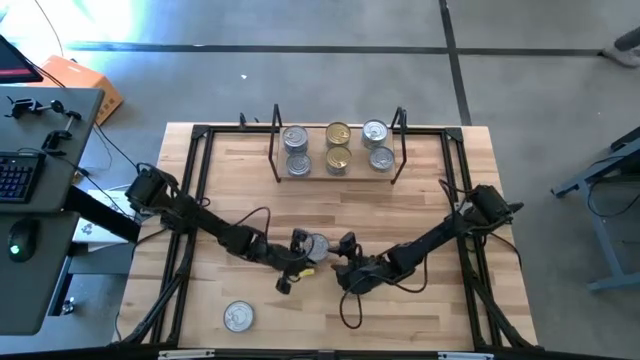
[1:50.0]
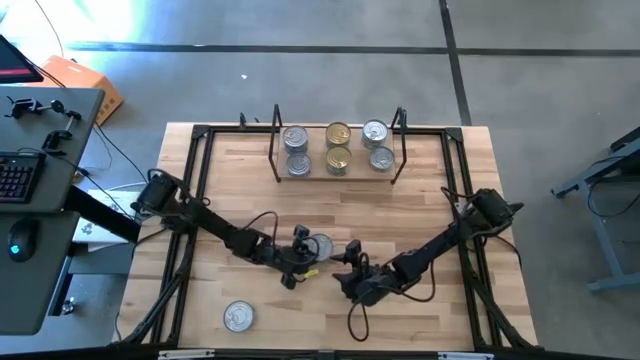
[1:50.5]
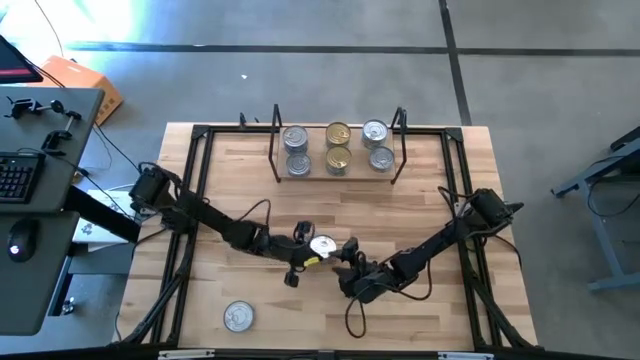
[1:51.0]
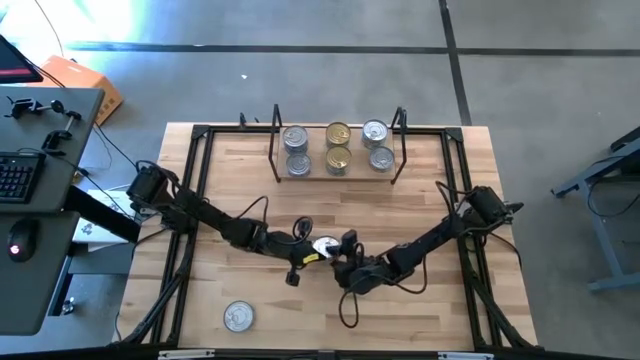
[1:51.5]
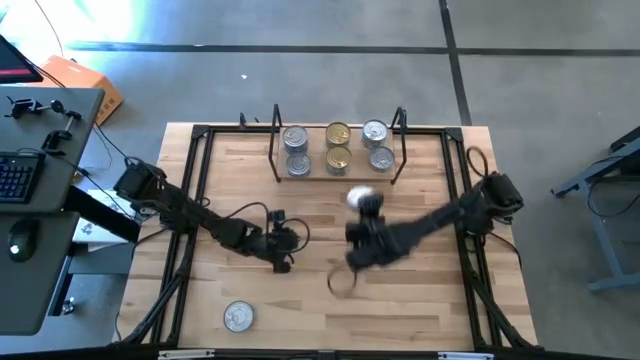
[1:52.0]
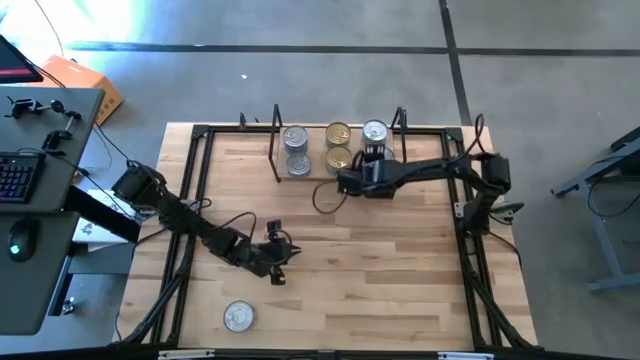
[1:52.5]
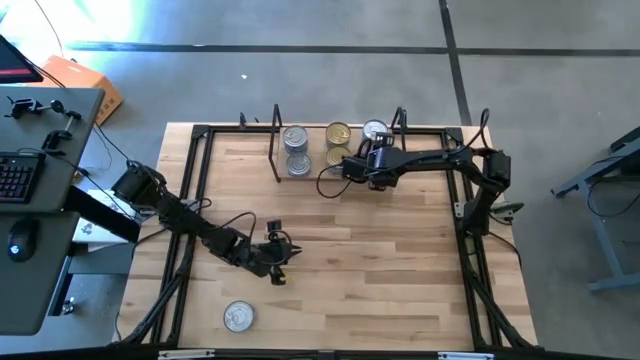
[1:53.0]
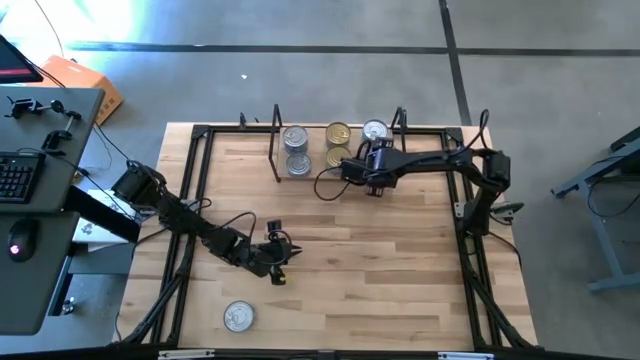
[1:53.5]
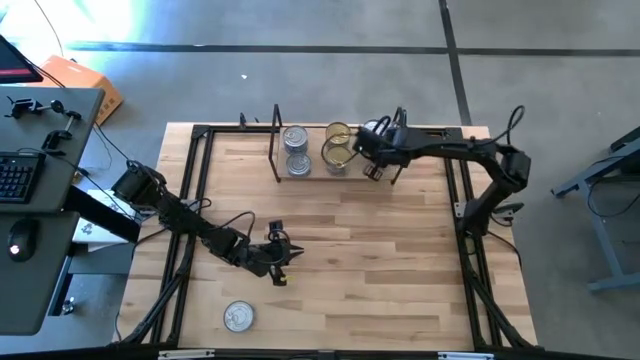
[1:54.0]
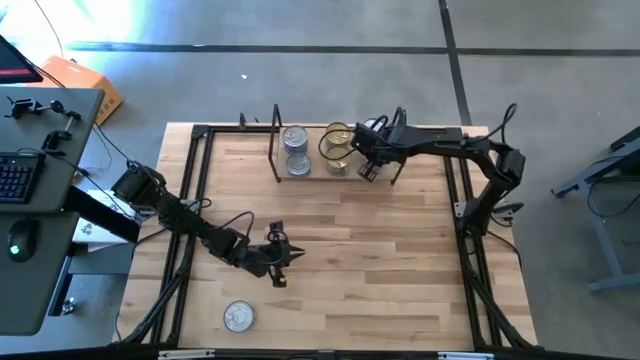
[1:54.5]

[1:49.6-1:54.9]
Task: Stack canned seafood by type on shelf
Stack the yellow and blue tuna can on top of the yellow and blue tuna can on the shelf

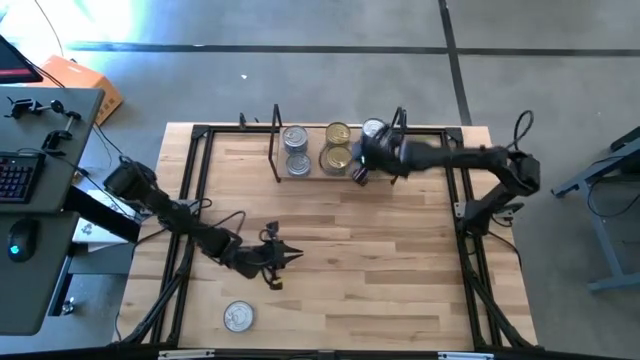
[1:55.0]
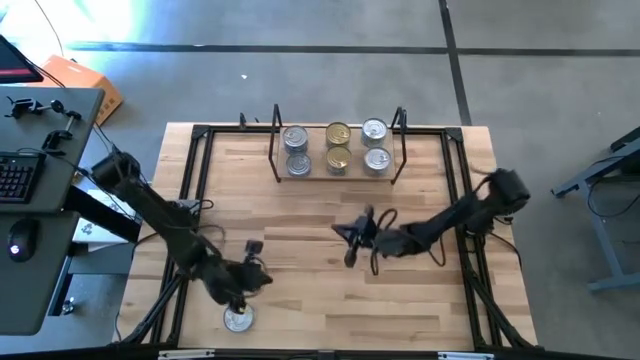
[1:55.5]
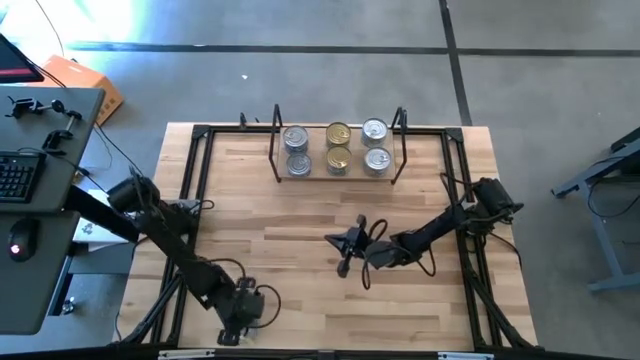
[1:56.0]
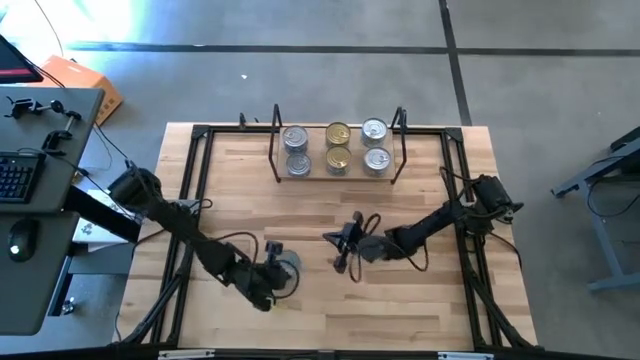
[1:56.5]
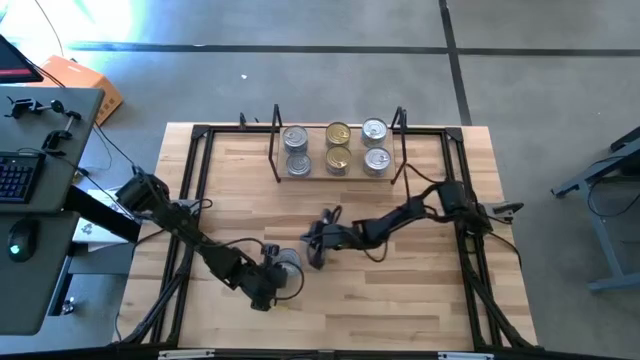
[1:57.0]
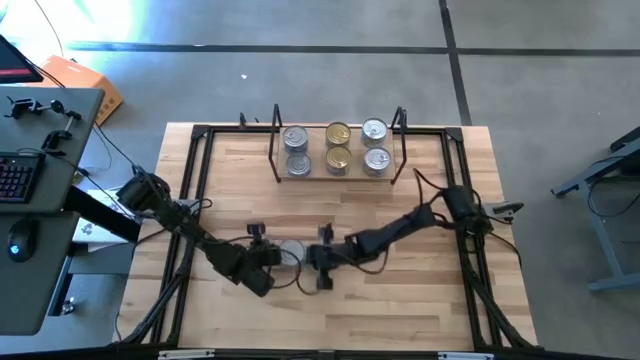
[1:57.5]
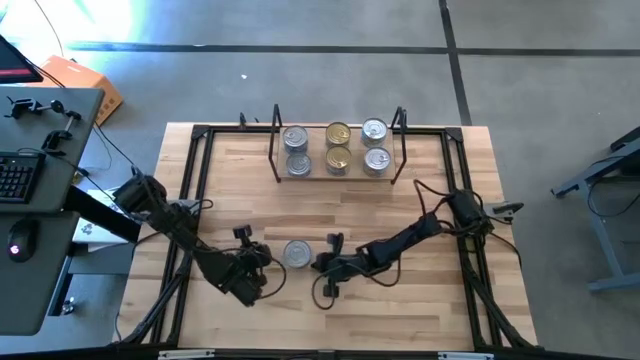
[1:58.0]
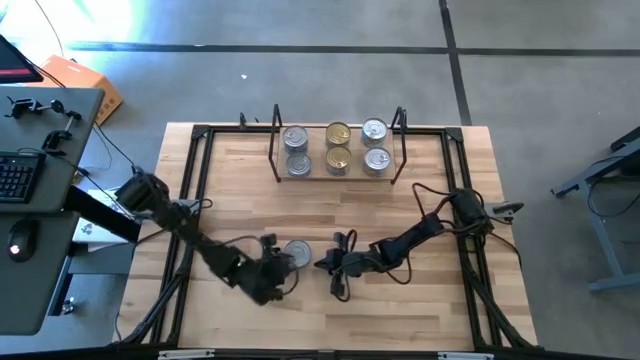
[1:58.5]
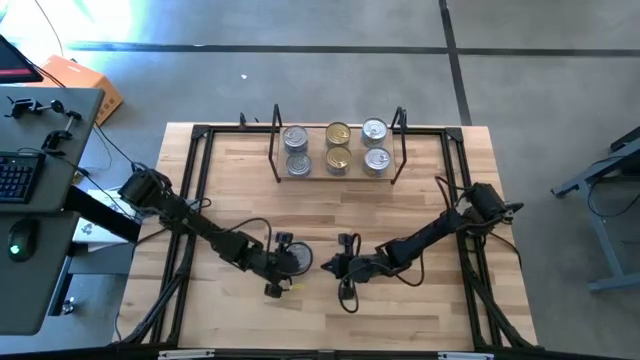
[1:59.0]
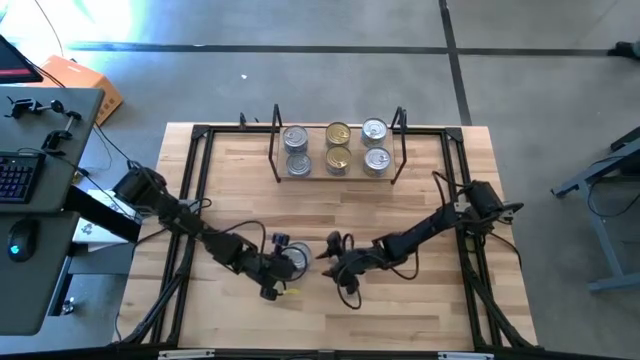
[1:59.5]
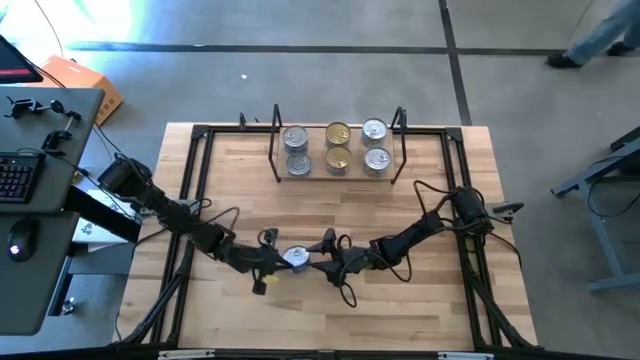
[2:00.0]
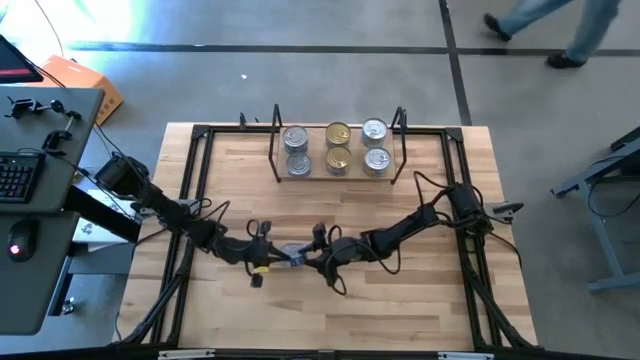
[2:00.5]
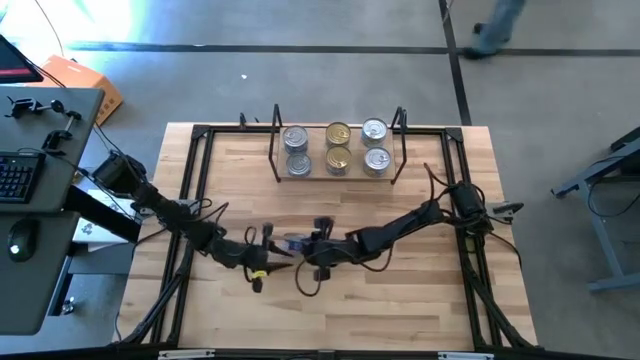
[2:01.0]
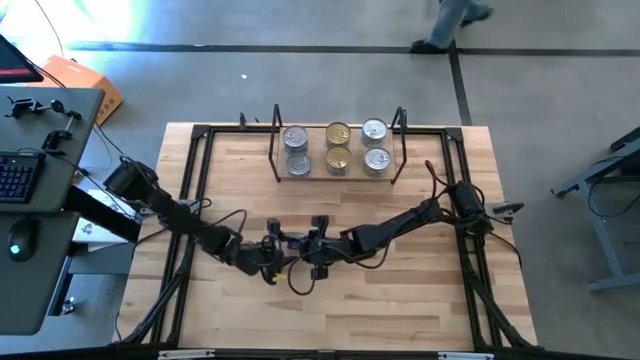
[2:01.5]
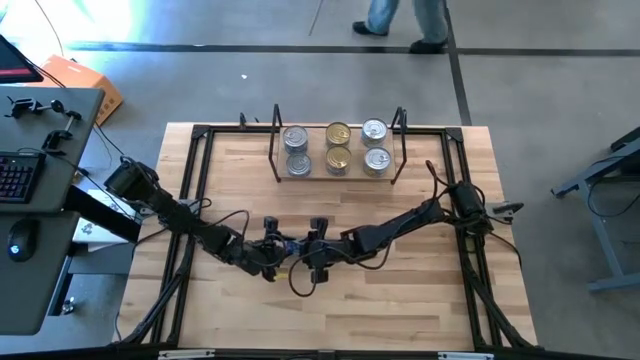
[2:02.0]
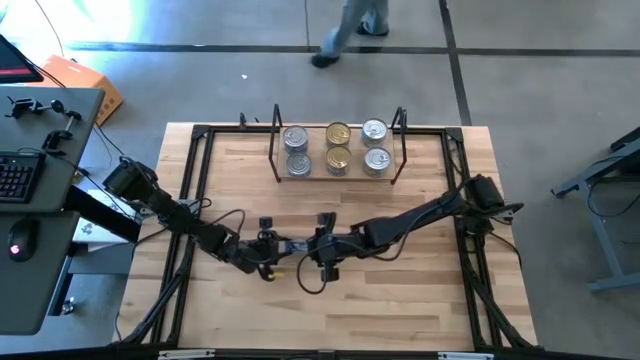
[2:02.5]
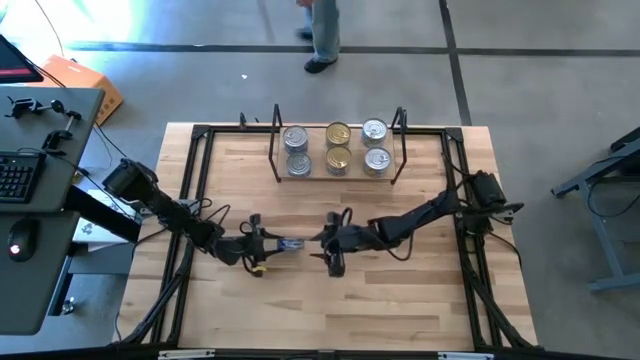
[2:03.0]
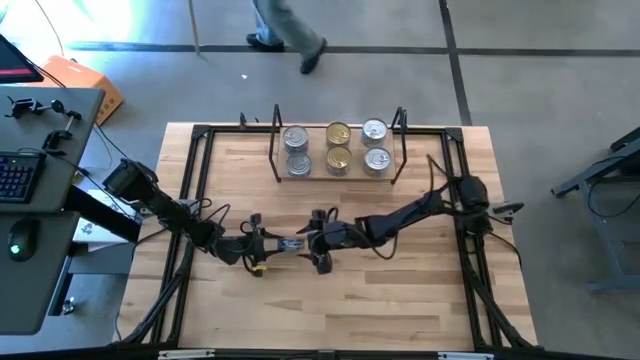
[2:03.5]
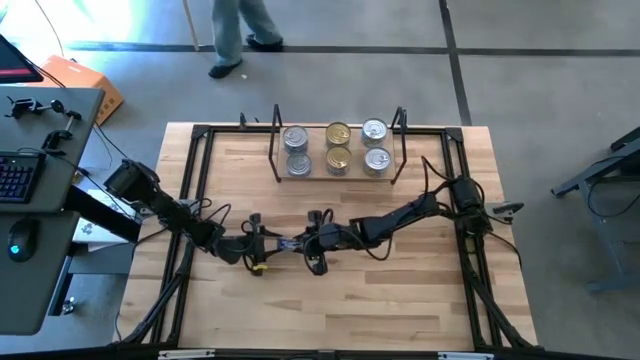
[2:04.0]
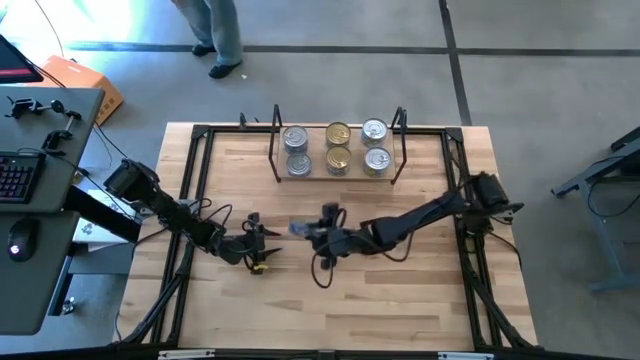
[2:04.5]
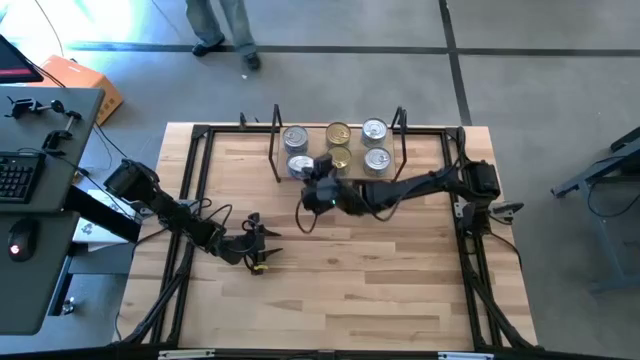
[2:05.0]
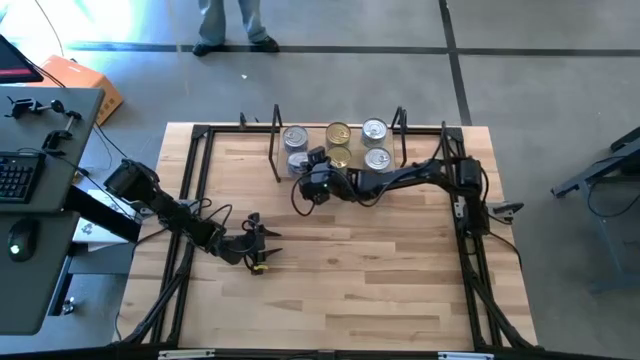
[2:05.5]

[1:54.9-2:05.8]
Stack the blue tuna can on top of the blue tuna can on the shelf

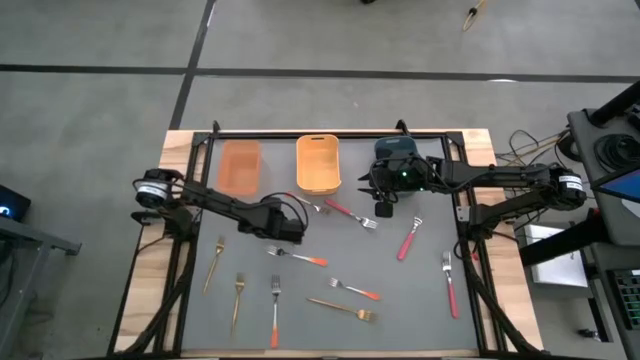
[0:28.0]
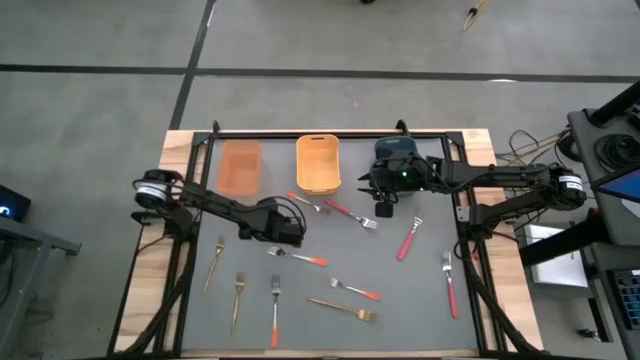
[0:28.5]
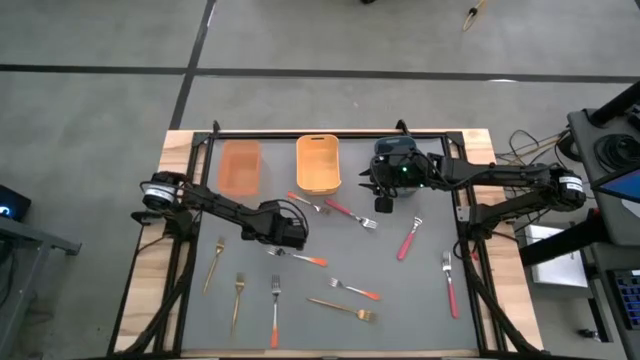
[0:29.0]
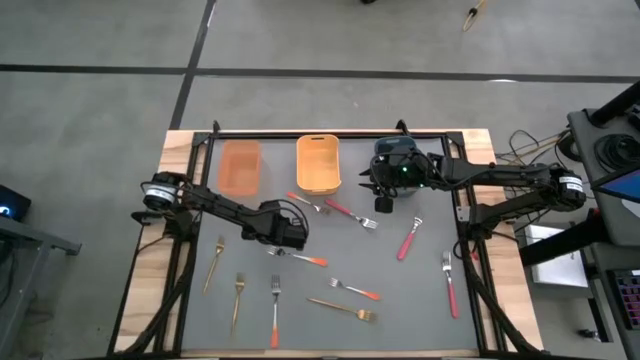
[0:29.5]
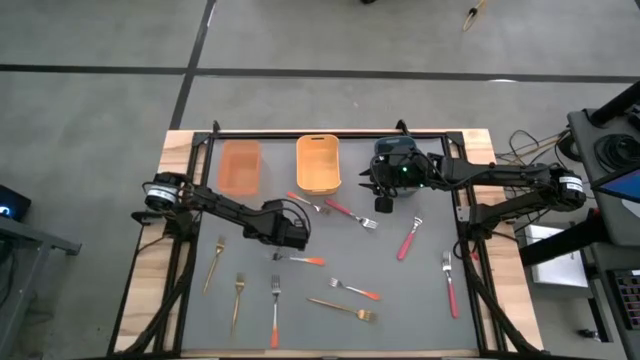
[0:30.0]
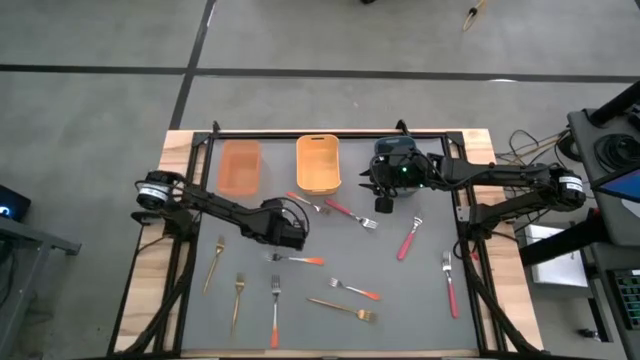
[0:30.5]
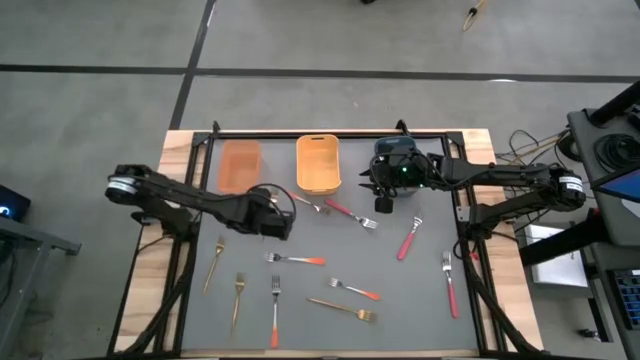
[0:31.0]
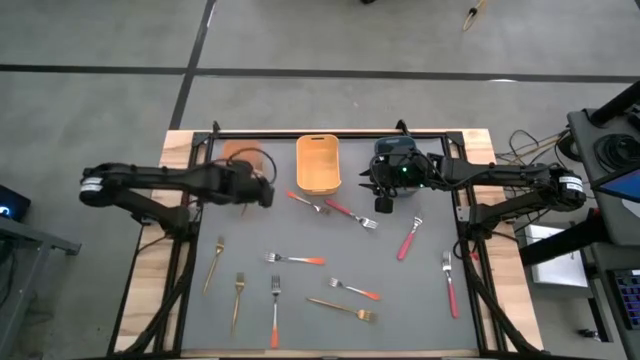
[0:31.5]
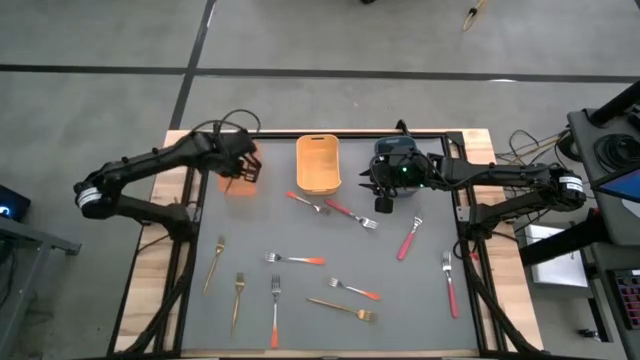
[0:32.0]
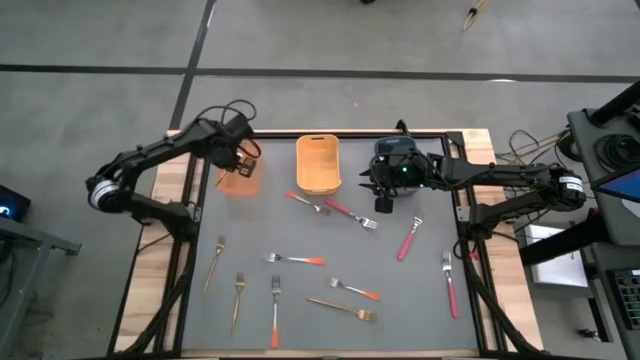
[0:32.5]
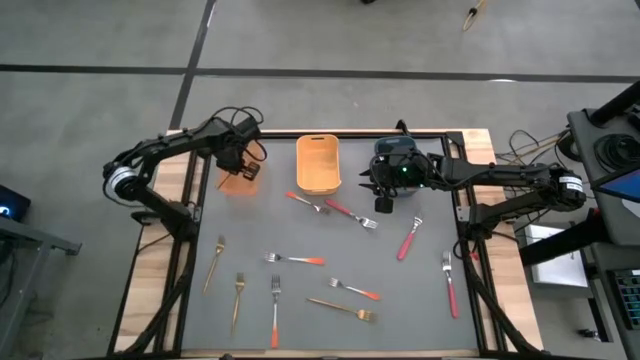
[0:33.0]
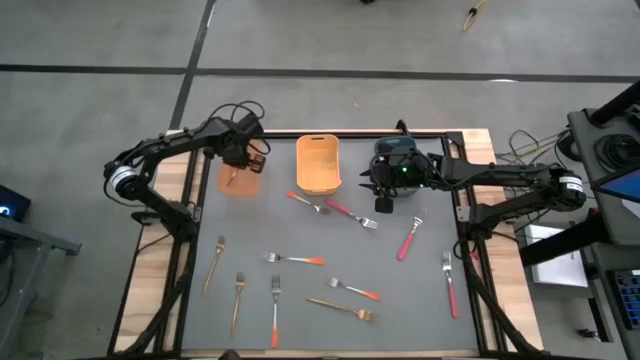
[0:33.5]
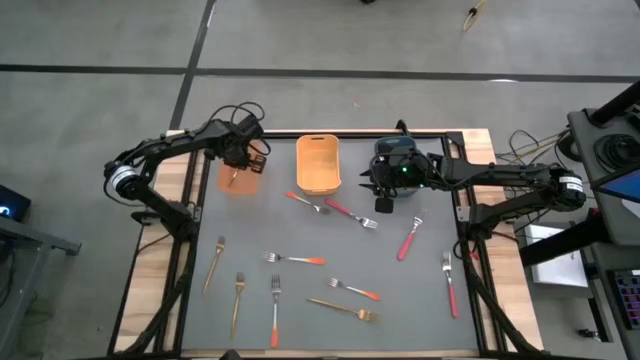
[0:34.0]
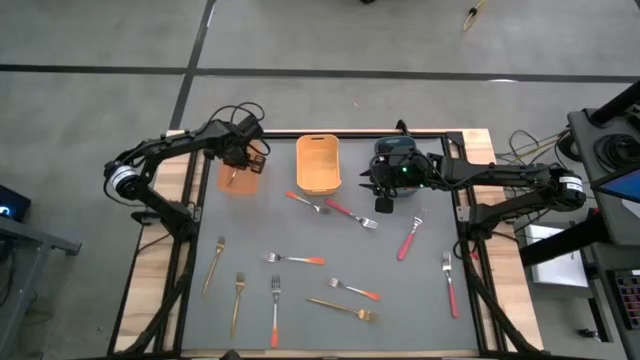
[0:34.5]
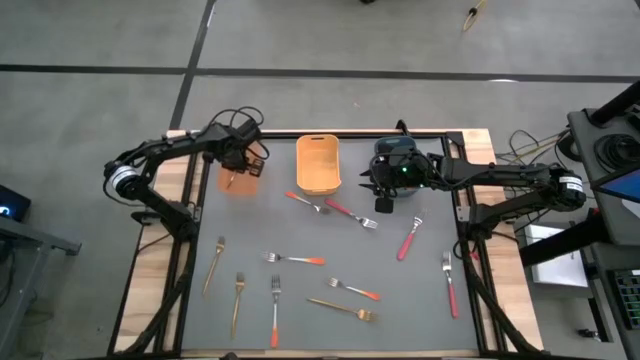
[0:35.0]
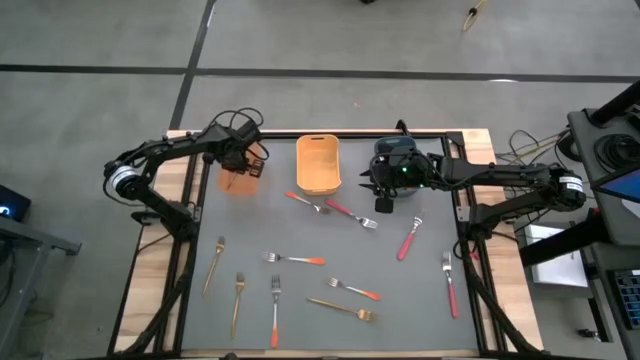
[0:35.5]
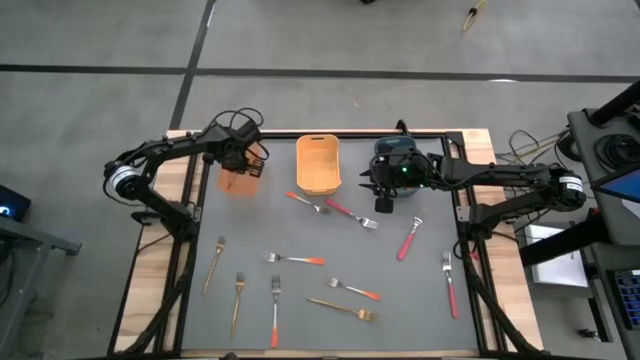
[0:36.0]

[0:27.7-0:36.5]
Task: Sort silverware by color (type)
Put the gold fork into the orange bin
